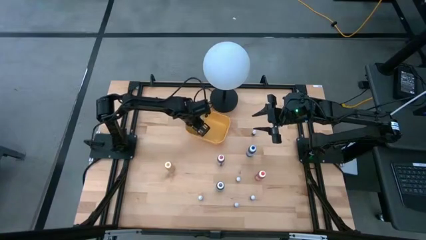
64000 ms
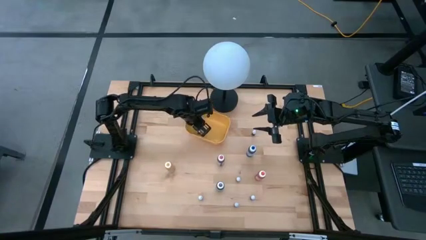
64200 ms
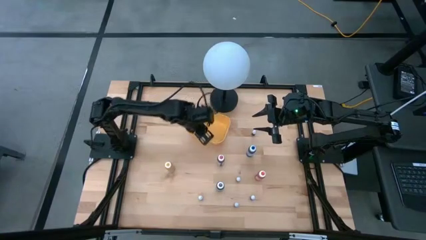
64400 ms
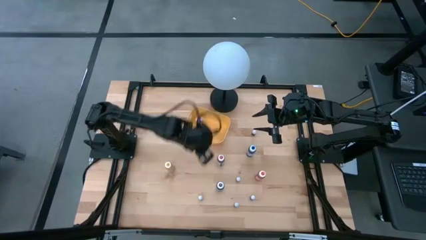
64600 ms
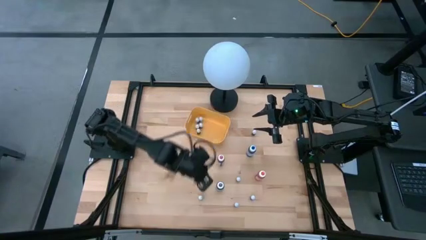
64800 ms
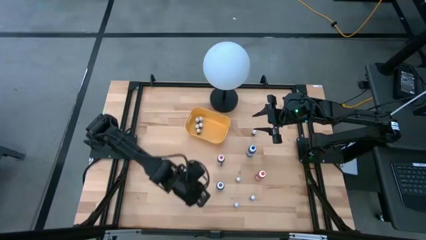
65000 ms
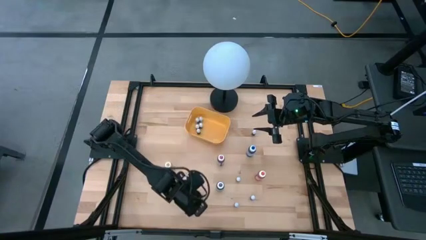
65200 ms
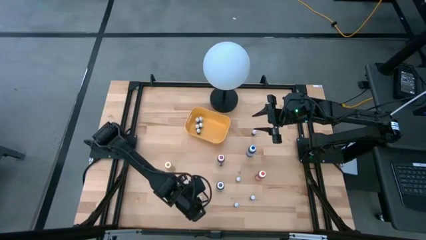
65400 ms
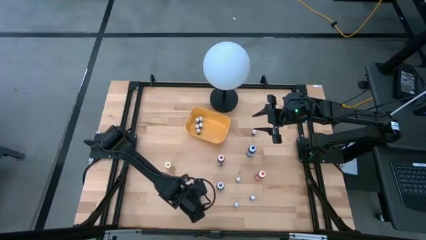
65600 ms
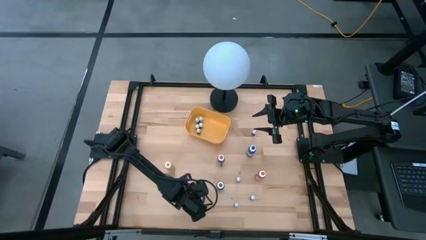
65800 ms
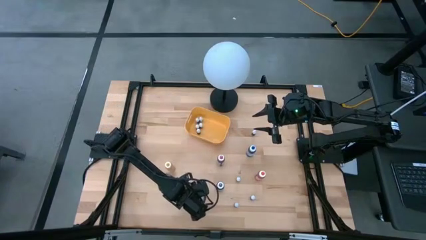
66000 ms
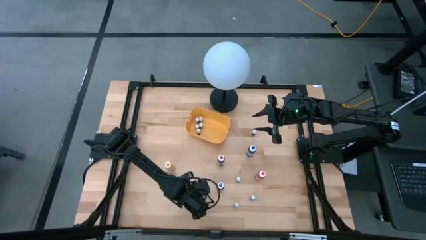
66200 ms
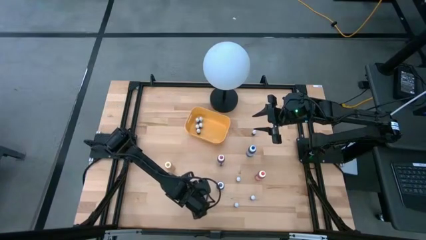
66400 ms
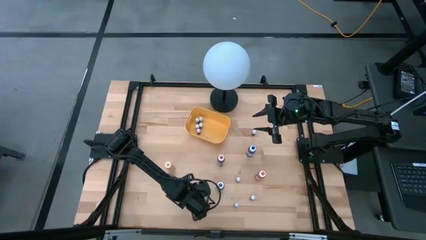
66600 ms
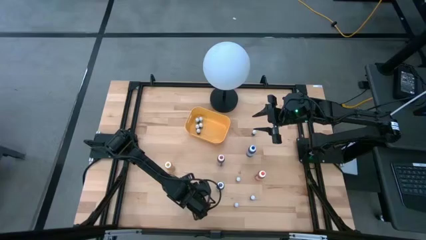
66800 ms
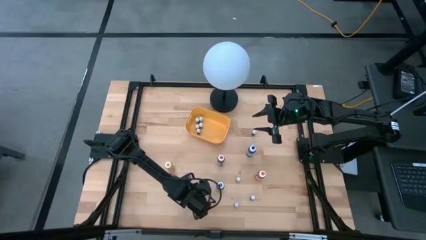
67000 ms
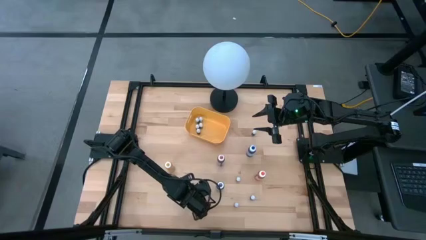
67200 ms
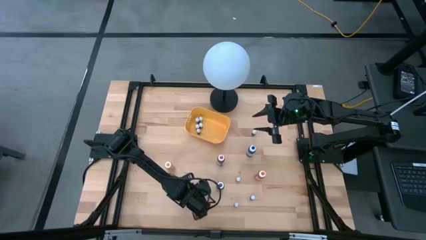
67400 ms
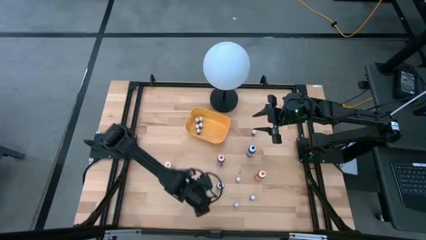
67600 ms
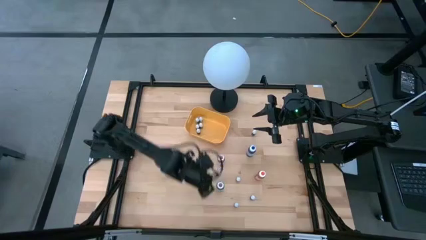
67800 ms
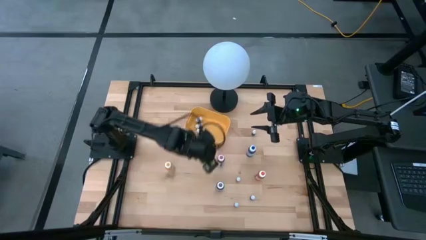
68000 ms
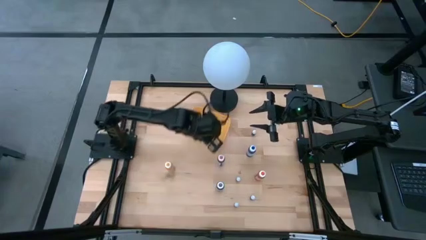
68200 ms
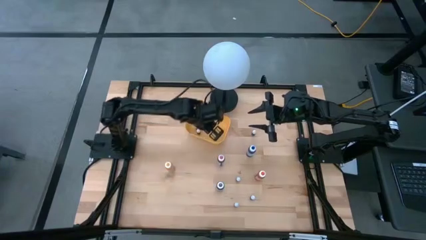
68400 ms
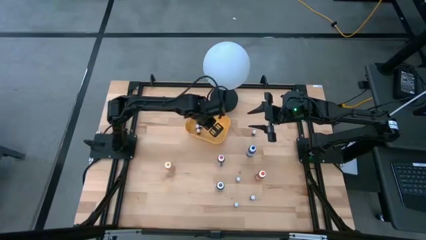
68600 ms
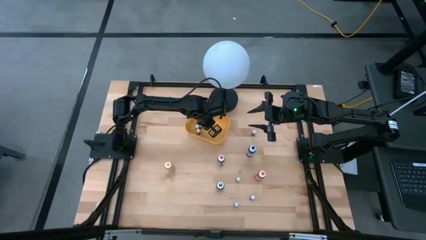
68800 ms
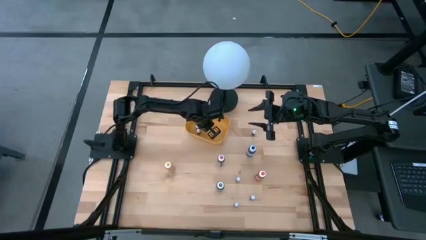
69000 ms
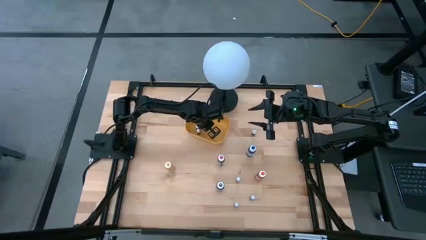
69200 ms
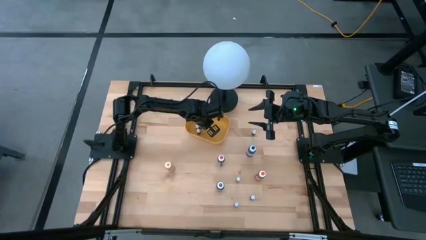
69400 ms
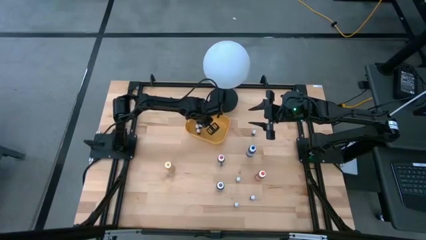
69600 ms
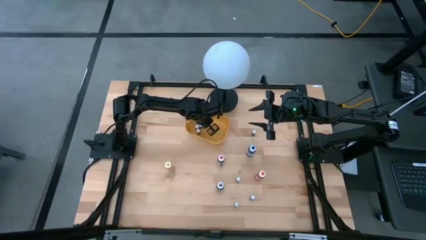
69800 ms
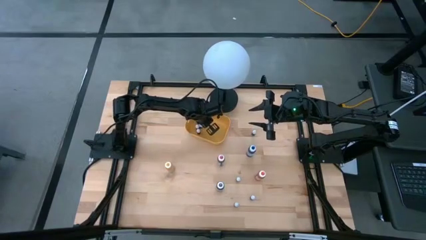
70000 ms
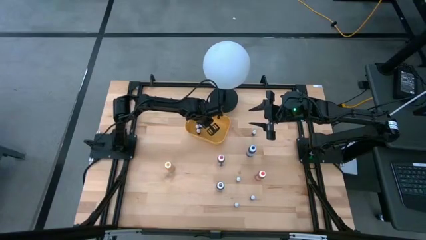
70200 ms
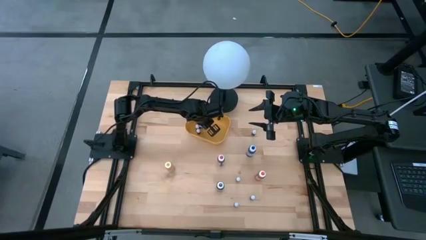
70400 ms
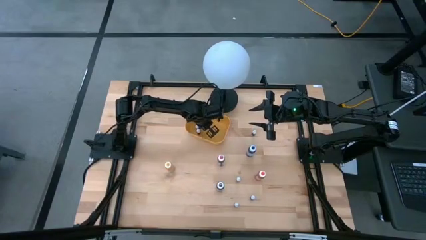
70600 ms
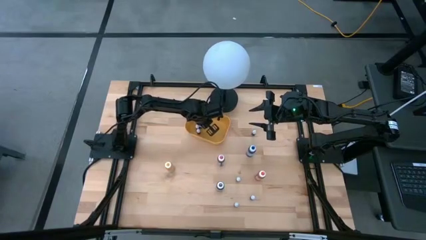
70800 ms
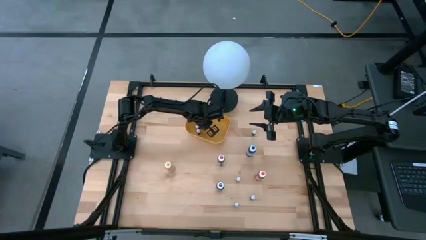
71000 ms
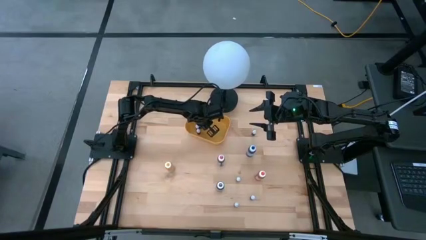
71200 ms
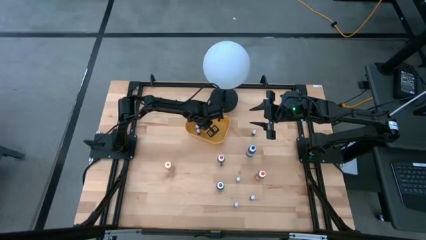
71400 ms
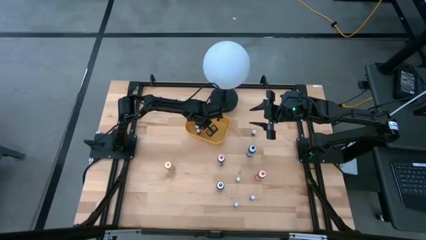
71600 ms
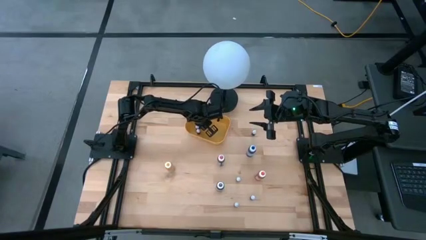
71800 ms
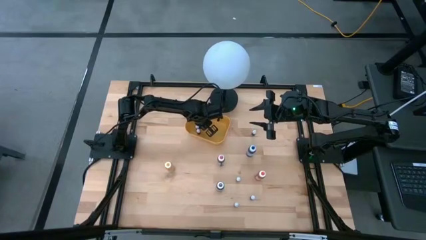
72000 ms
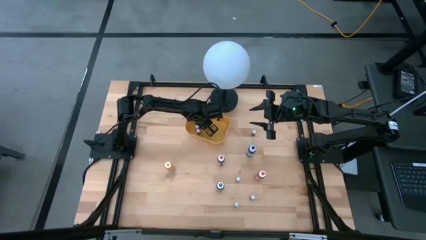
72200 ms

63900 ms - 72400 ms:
Task: Pick & Place food coloring
Put the small black food coloring bottle into the yellow bin

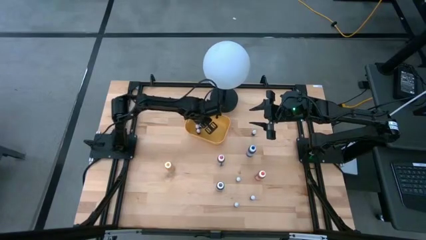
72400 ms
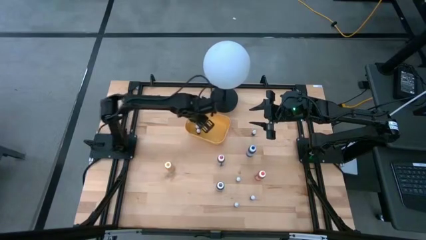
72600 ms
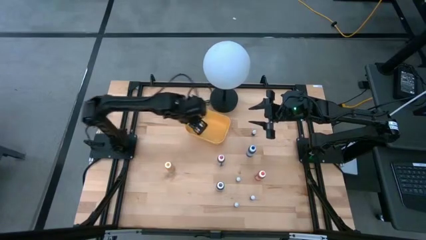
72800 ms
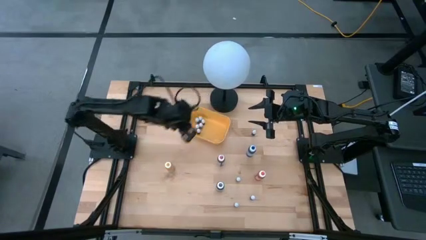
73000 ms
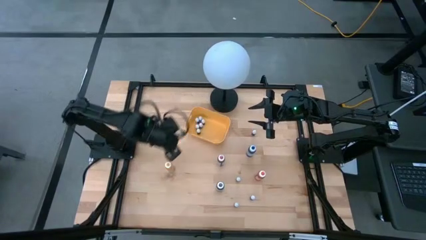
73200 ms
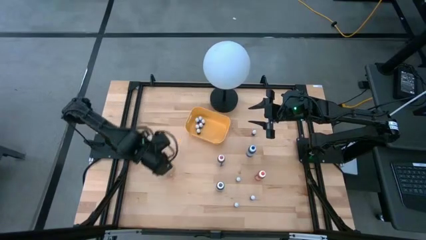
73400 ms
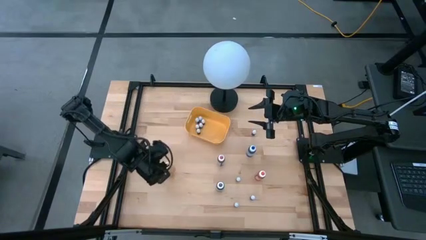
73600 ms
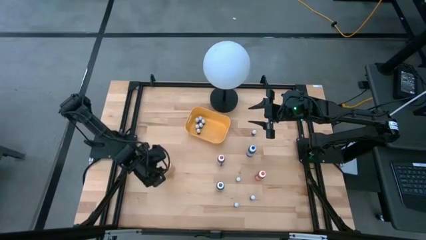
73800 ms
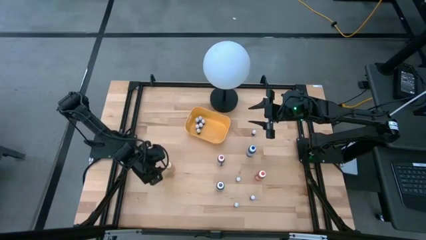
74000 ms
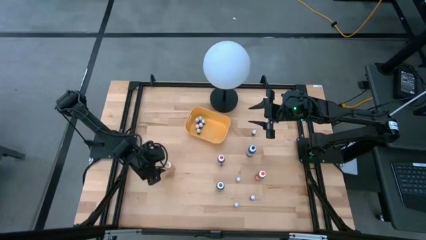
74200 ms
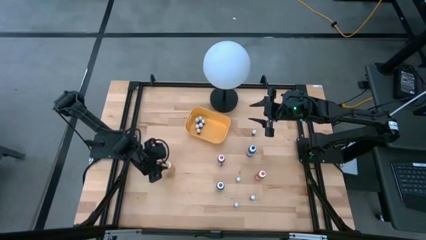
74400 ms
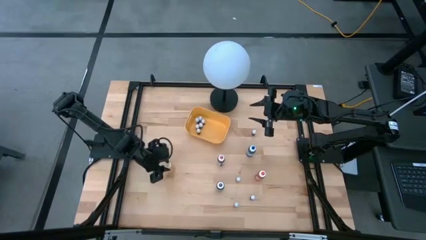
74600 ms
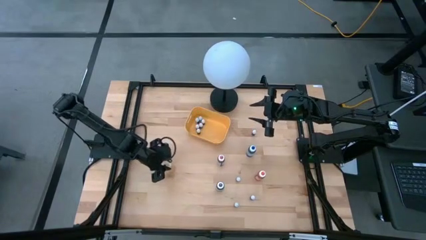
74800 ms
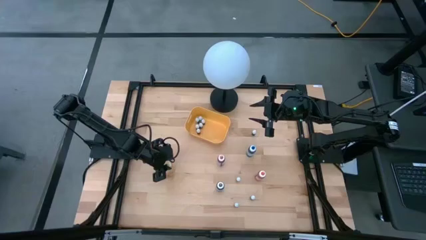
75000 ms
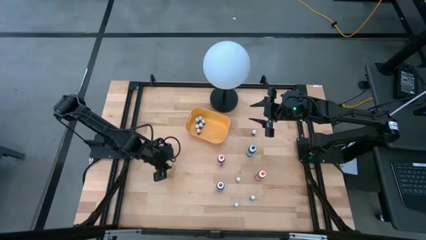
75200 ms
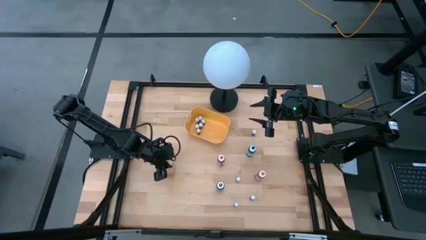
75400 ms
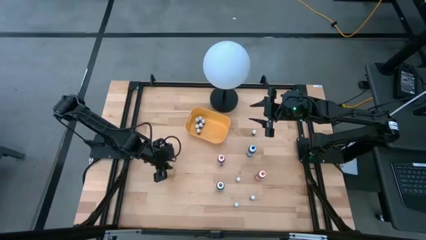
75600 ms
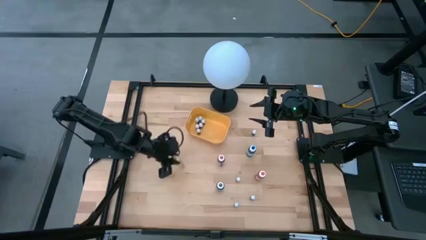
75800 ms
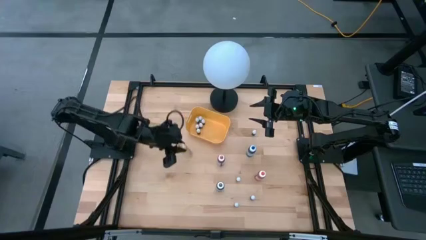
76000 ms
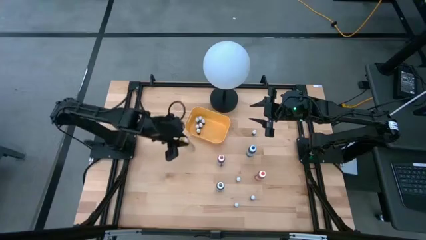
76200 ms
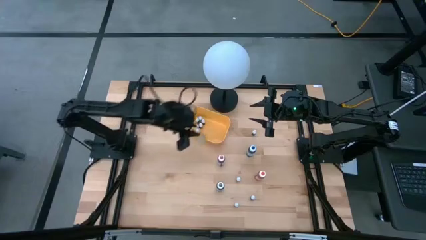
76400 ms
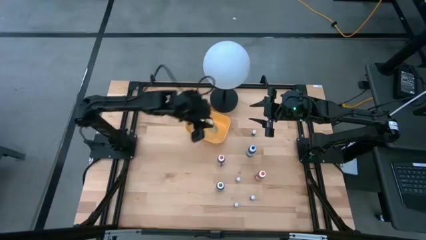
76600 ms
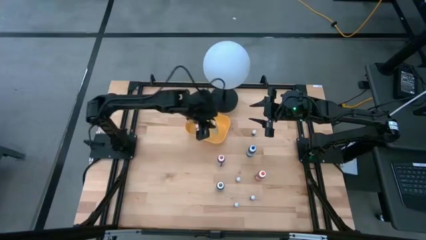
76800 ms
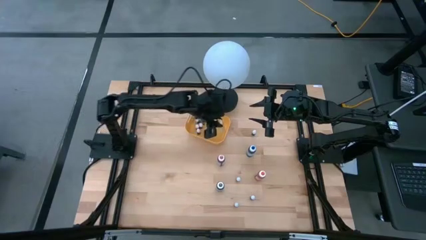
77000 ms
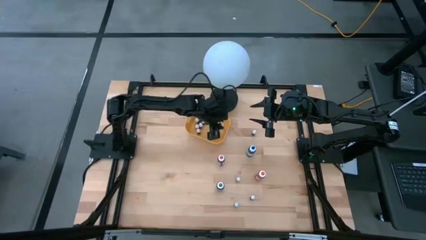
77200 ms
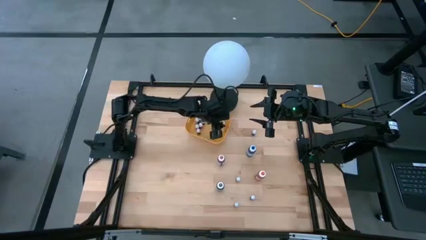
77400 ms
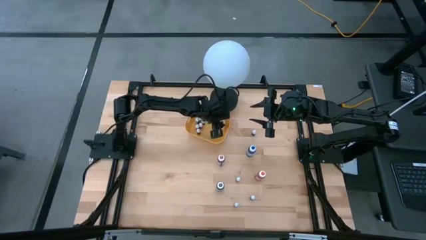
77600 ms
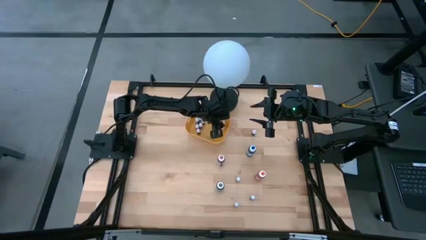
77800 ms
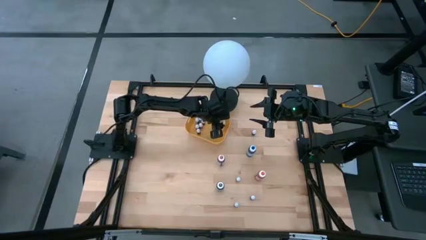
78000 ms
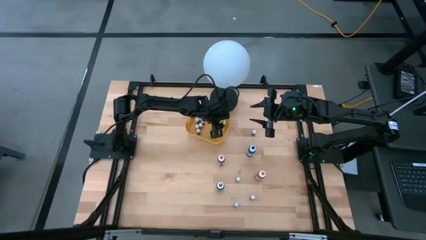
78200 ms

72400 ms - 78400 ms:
Put the large yellow food coloring bottle into the yellow bin
